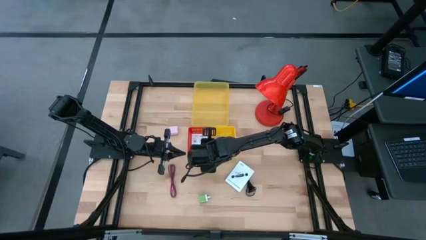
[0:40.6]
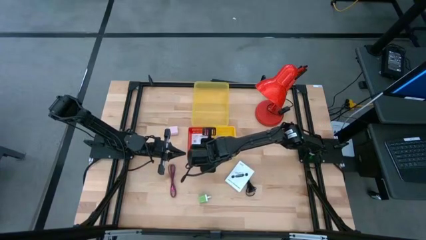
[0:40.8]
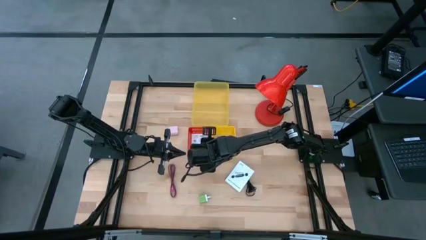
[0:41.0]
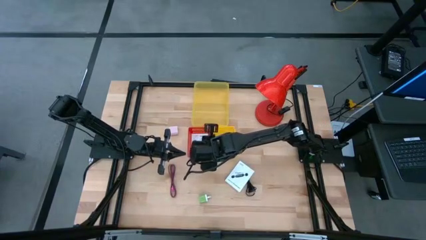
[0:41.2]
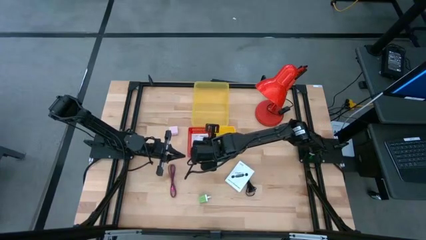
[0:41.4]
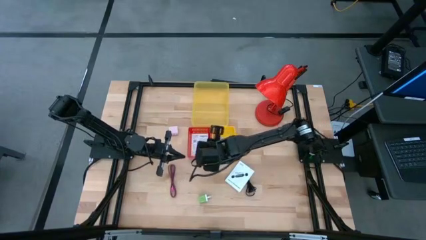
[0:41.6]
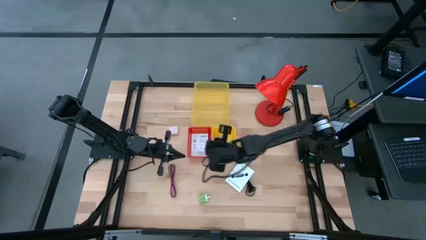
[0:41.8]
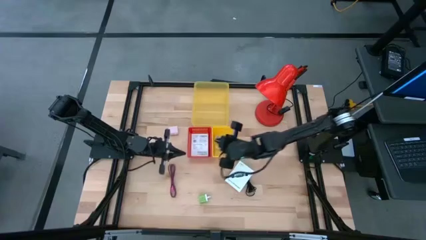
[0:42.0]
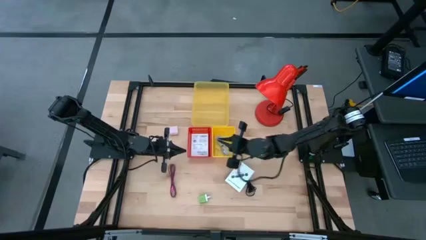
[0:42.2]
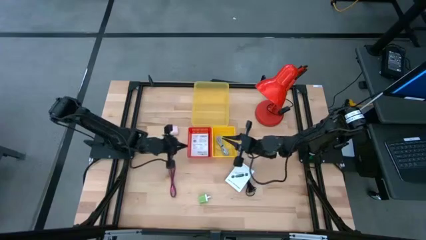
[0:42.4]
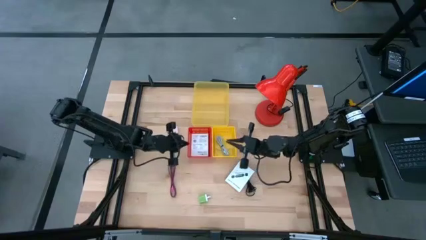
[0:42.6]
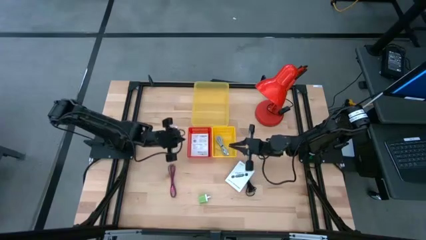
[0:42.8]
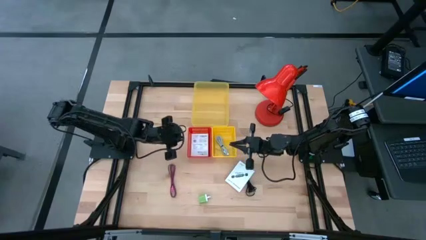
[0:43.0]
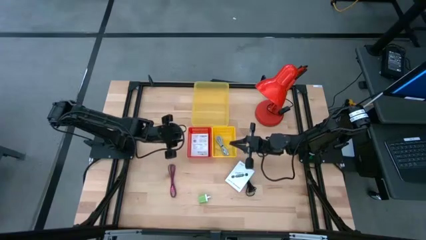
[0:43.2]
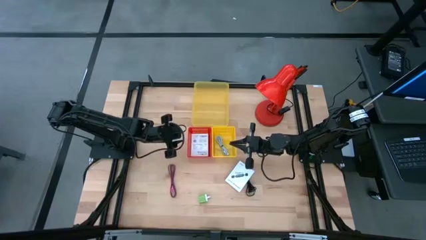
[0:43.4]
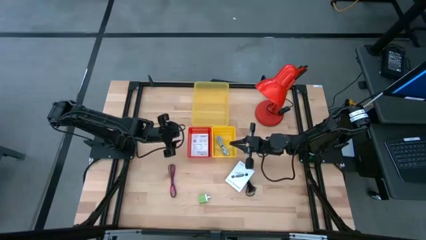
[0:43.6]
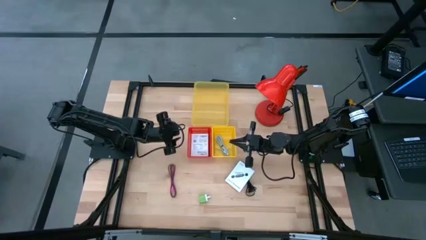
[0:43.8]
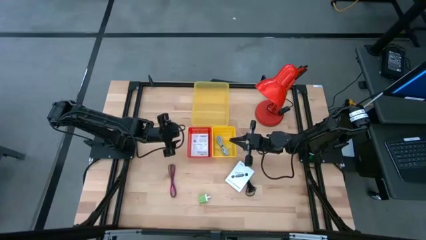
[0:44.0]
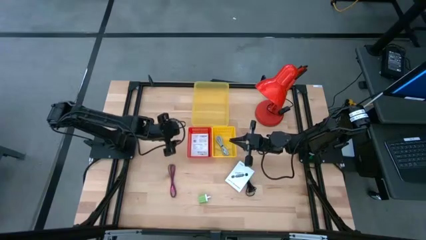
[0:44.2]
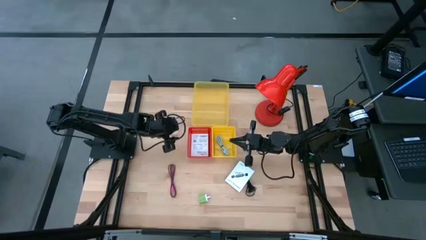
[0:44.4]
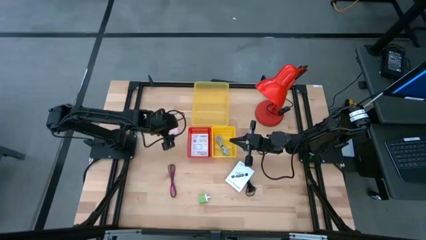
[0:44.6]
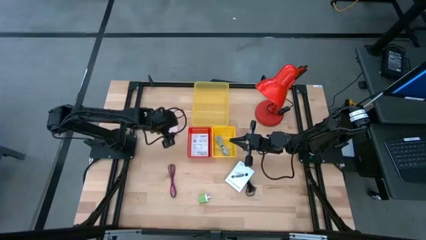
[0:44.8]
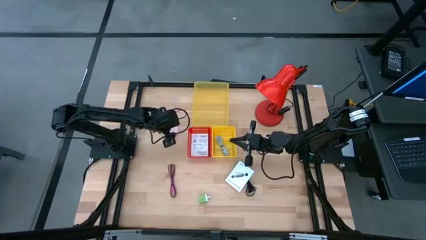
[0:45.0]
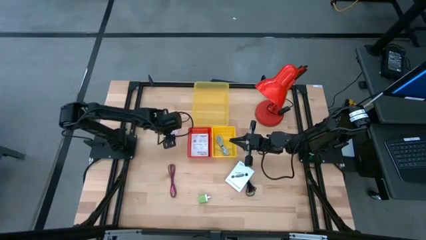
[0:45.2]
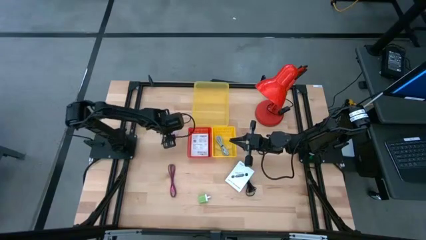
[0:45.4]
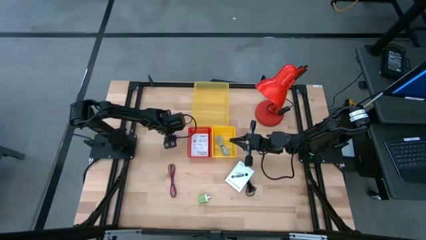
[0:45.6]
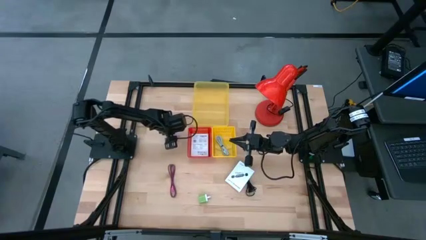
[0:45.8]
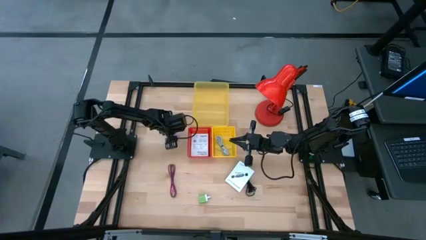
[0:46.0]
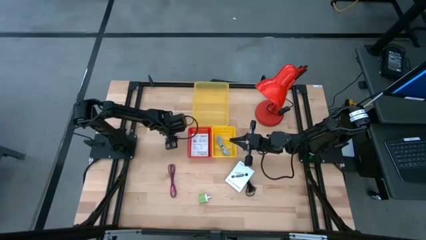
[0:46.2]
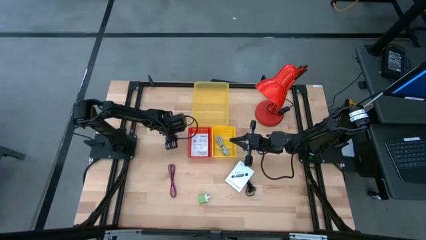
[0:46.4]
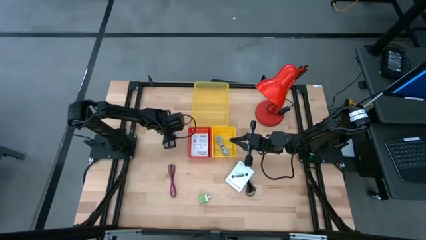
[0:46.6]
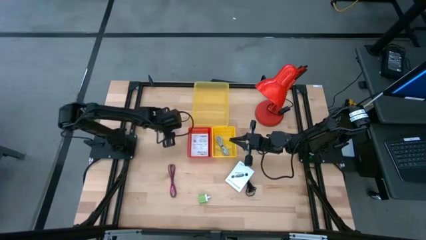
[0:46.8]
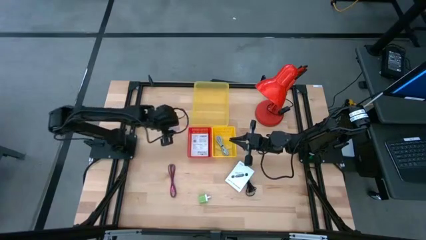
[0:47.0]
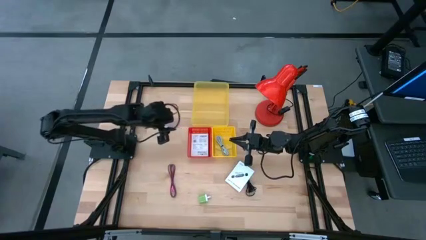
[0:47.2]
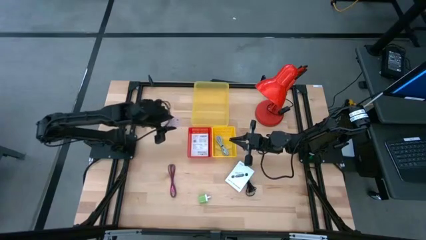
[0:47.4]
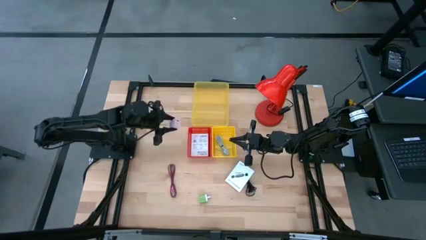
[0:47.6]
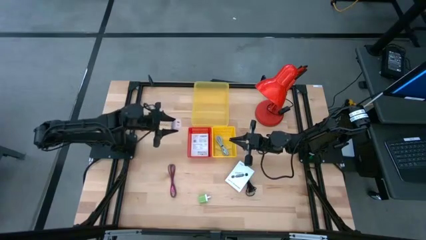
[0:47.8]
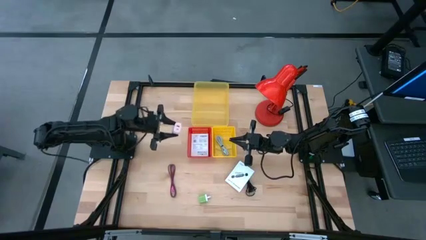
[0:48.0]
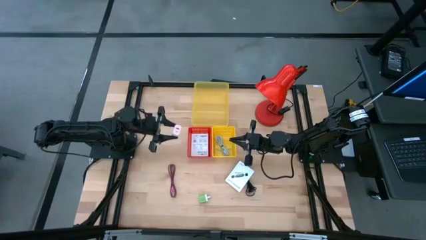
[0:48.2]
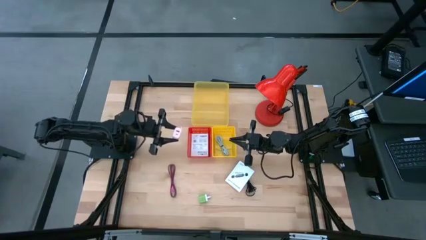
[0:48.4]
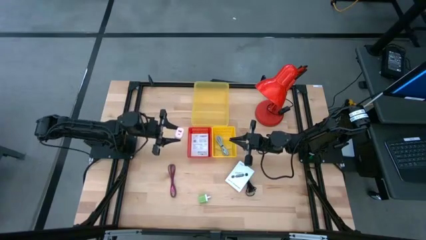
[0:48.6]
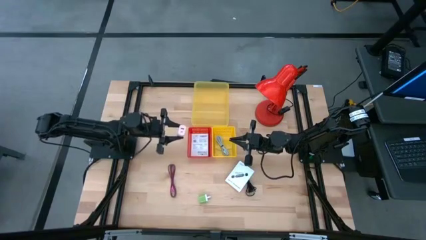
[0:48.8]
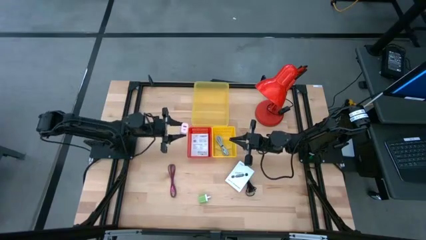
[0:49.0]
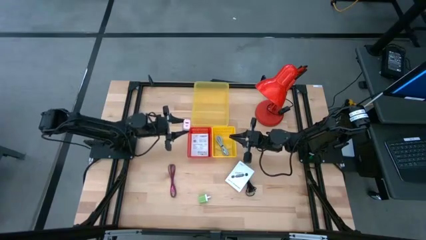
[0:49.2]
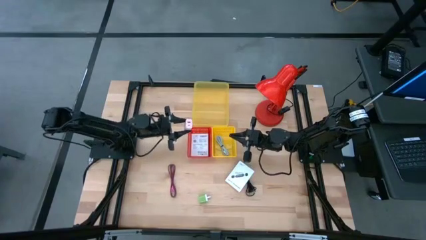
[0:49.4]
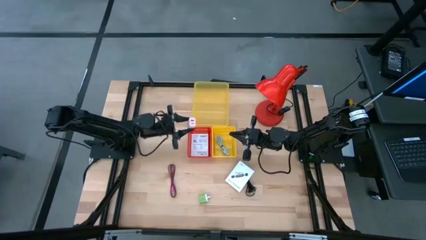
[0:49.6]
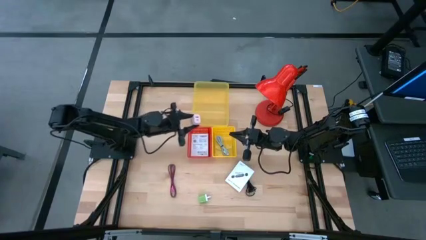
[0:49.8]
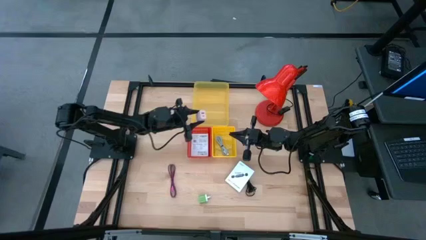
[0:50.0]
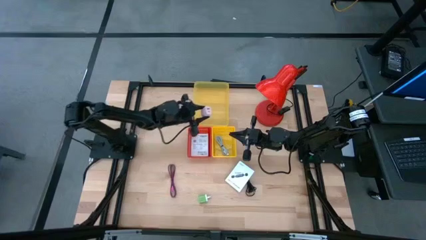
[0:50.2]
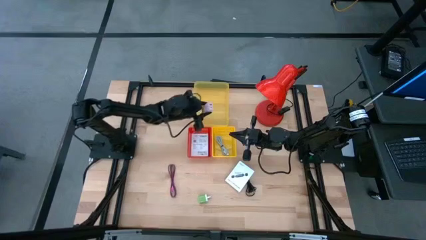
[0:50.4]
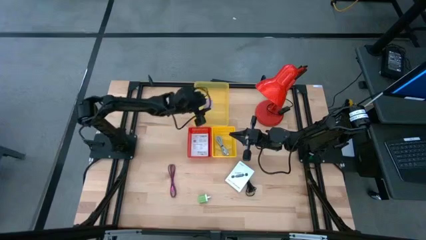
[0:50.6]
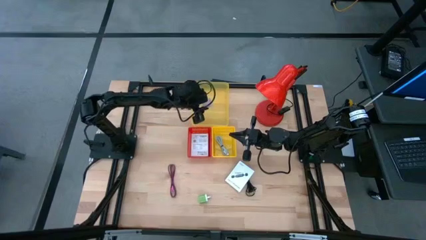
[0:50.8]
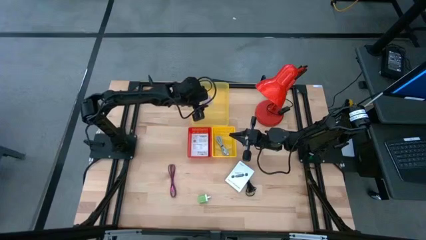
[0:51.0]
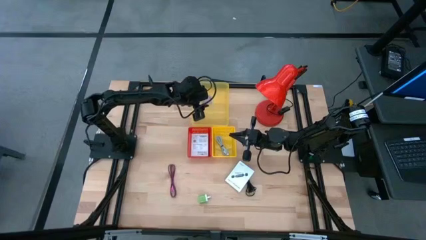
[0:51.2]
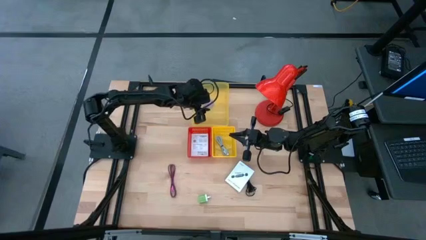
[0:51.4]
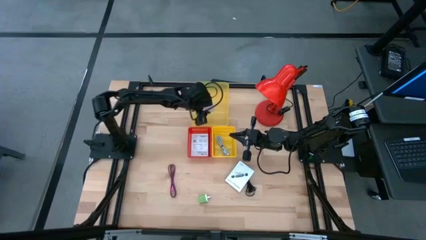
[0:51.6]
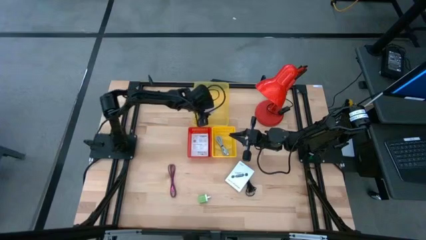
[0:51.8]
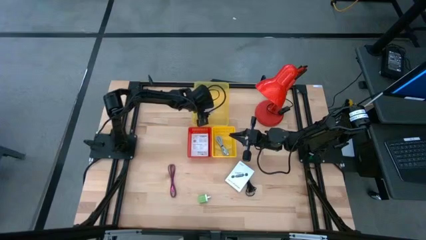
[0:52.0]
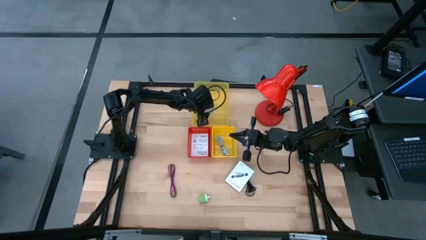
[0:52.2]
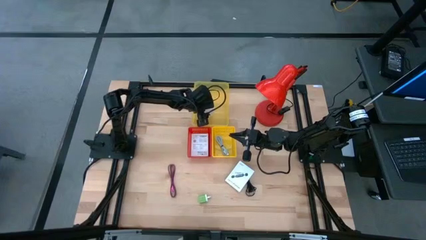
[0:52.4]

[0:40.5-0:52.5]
Task: Pick and place items into bin
Put the pink charger adapter into the transparent yellow bin
